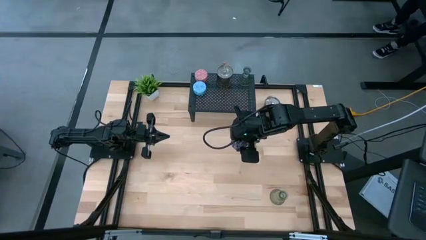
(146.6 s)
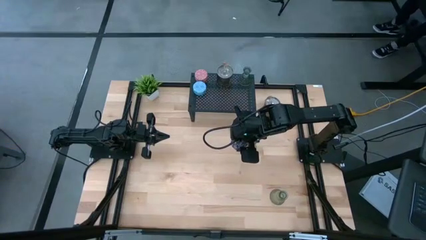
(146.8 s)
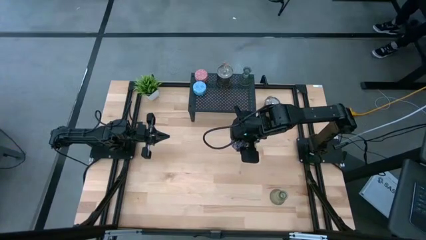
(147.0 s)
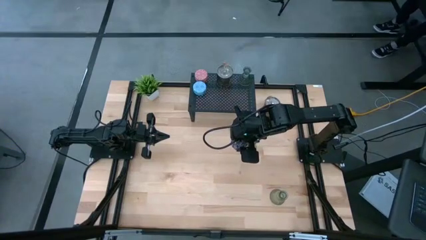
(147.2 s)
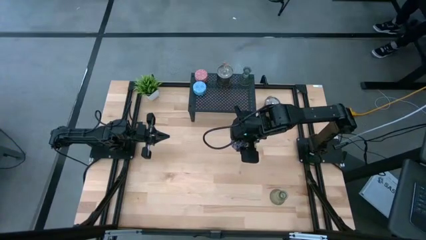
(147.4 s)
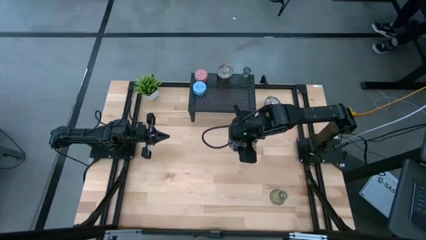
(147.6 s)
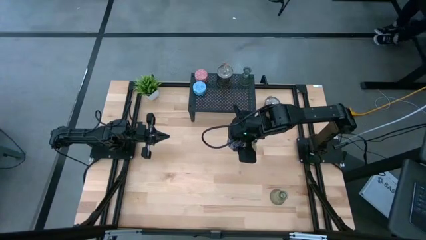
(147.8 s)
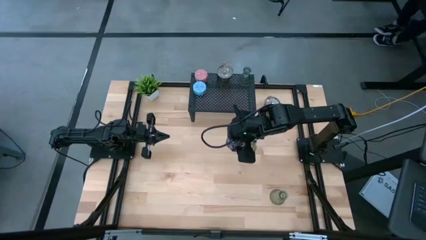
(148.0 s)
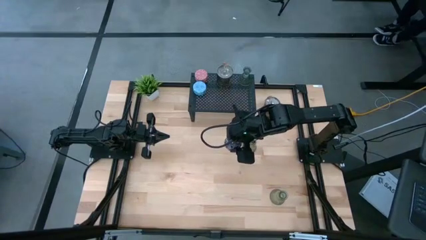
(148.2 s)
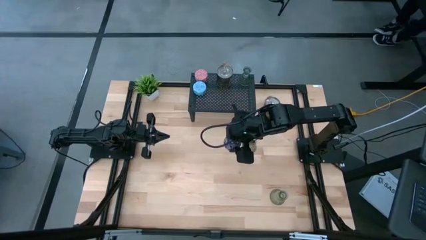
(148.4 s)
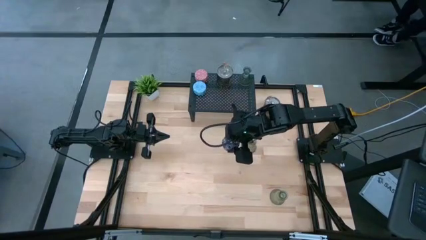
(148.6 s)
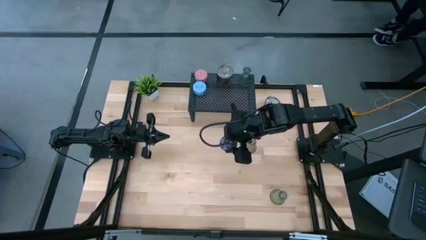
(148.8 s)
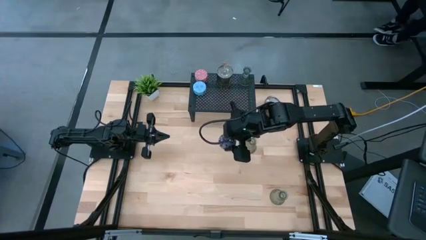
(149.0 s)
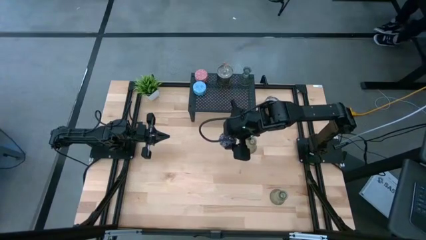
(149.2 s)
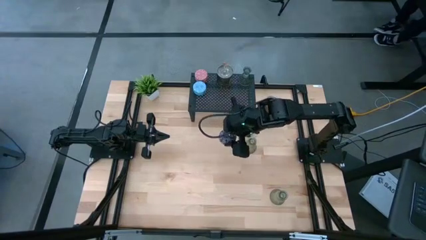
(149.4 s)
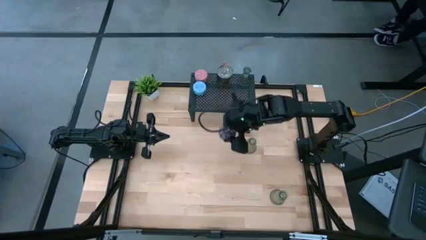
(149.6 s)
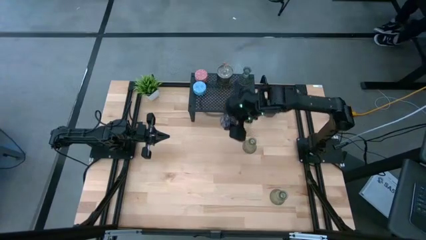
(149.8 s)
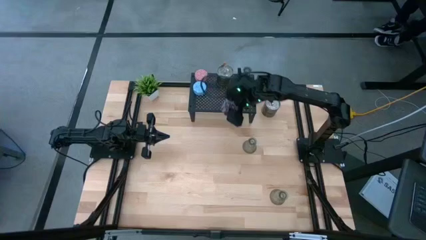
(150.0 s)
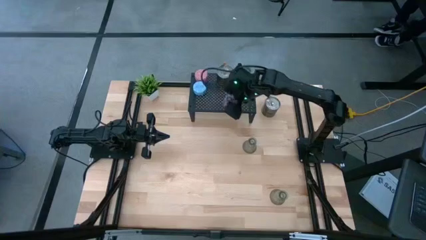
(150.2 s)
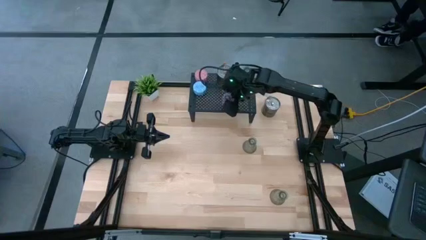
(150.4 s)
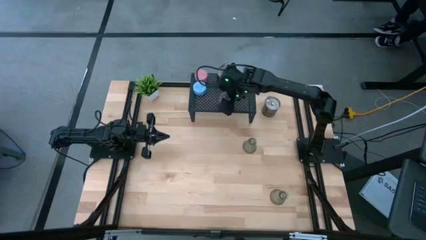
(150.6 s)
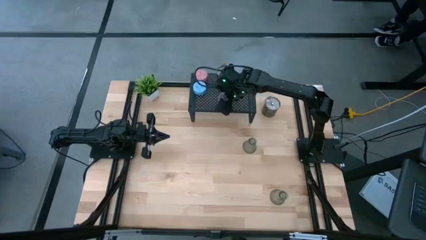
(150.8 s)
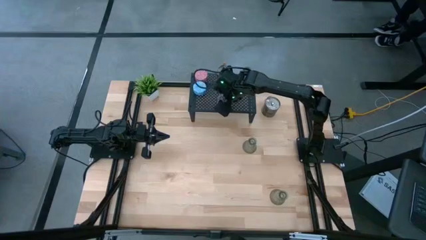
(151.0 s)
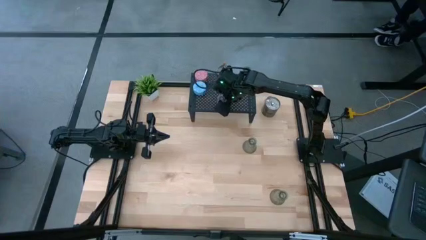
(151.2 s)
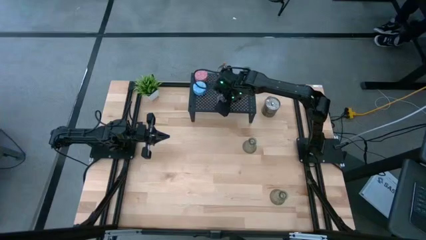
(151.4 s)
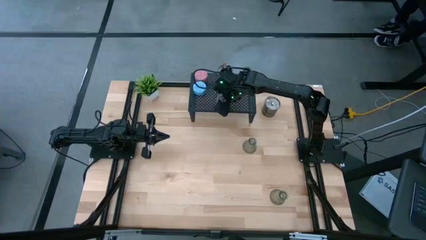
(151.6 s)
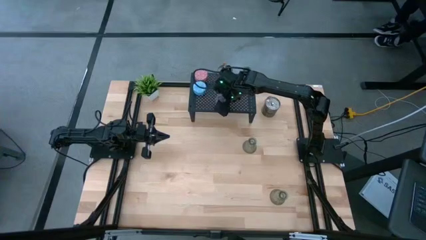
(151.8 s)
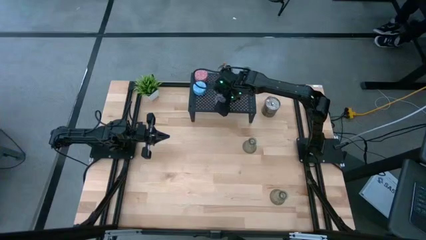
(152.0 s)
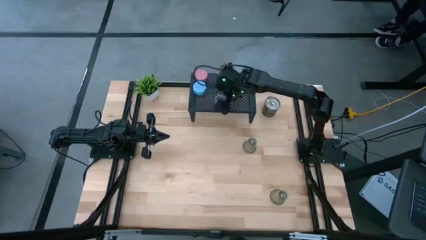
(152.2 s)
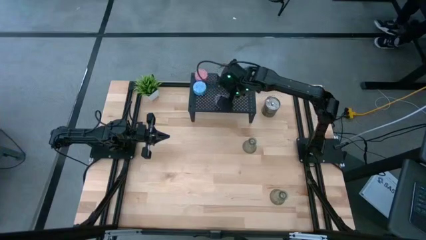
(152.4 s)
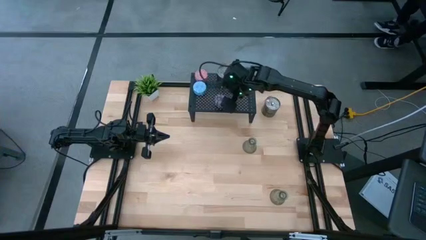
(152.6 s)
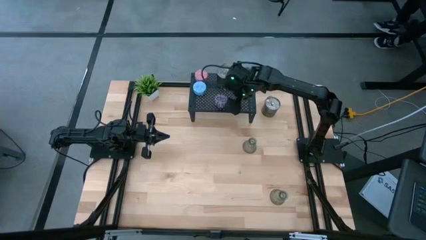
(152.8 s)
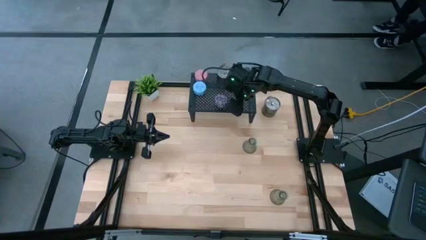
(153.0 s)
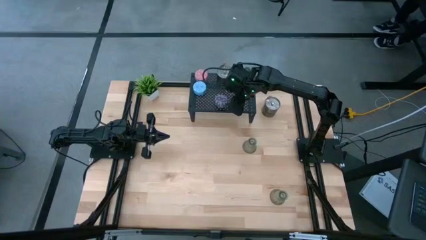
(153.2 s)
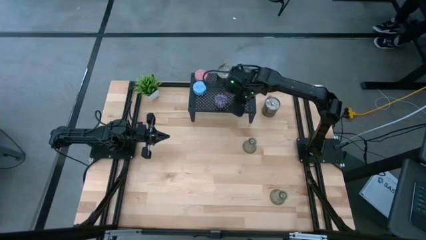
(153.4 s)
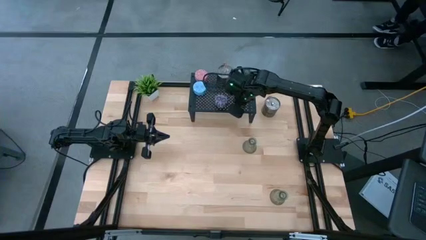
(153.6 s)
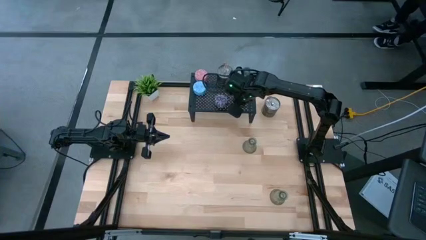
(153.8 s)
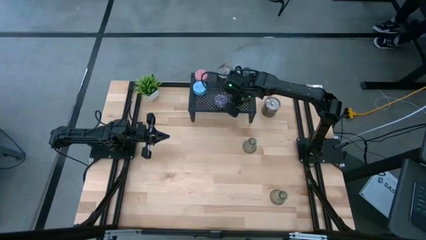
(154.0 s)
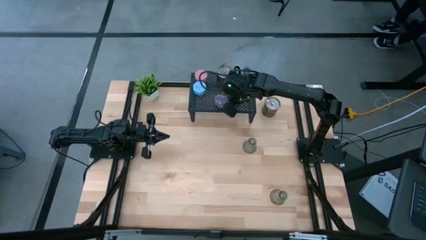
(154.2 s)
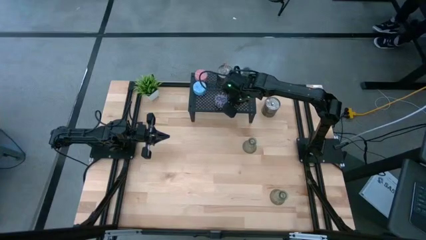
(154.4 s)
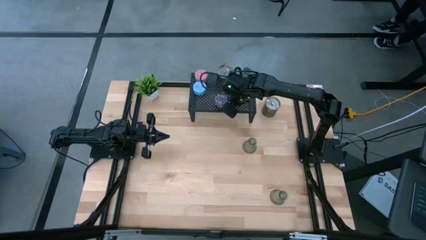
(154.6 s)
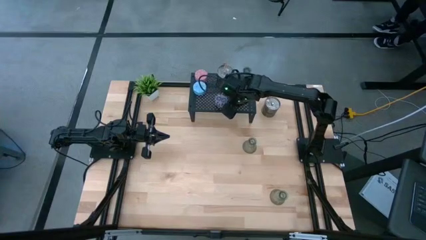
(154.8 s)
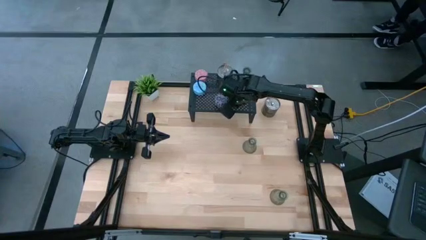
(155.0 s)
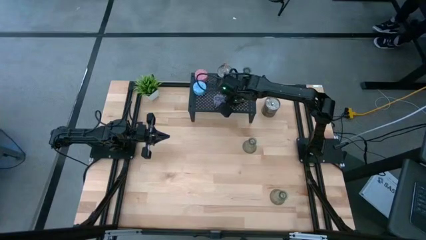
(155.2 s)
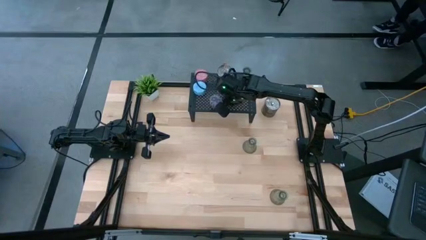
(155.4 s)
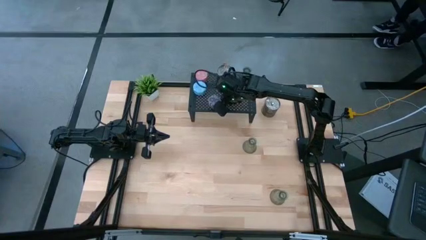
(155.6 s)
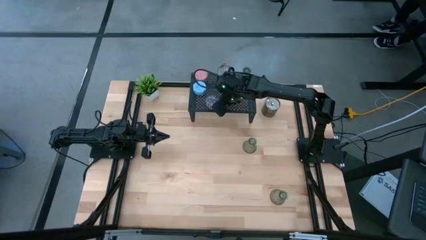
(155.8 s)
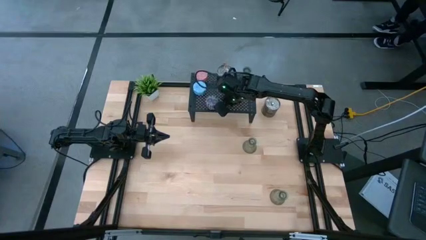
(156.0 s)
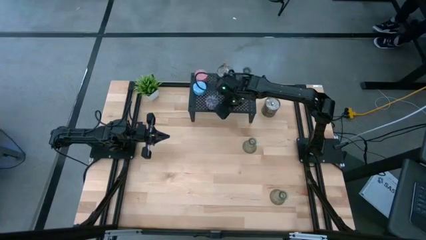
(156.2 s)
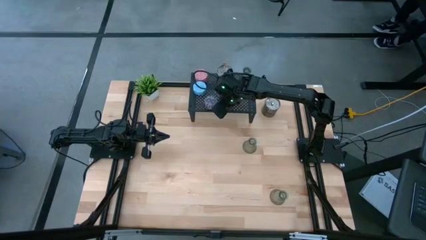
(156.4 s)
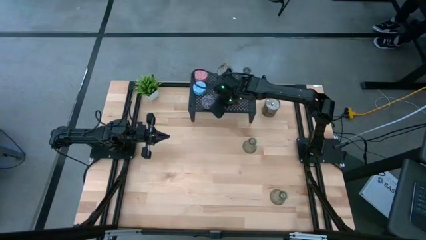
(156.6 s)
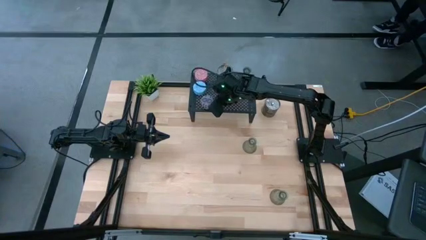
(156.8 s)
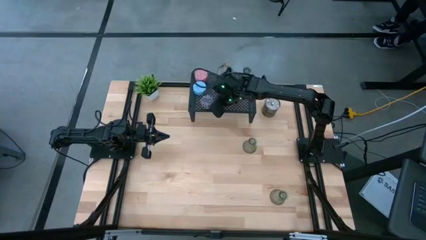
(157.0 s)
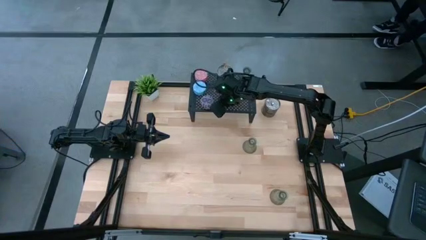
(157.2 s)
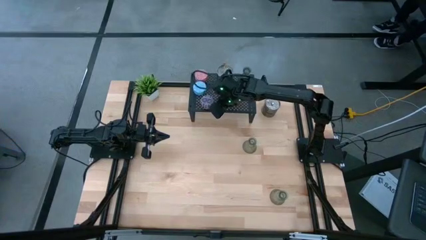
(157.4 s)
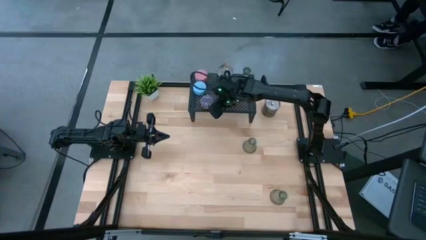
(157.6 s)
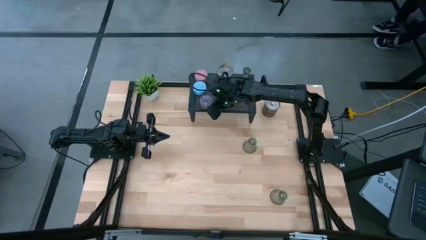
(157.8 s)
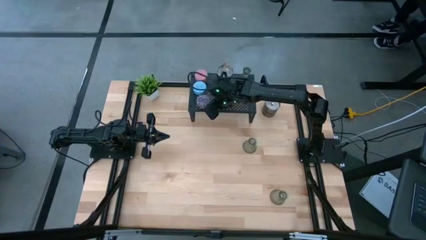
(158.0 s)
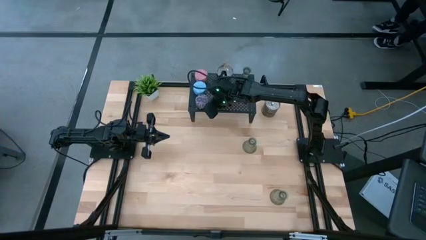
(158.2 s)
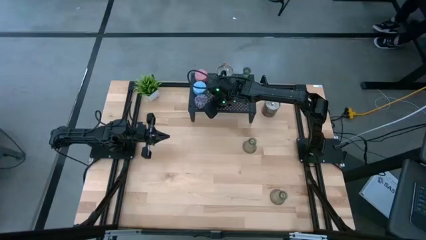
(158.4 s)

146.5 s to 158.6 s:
Task: Pick & Place candle stick holders
Put the black patterned scented candle on the shelf
